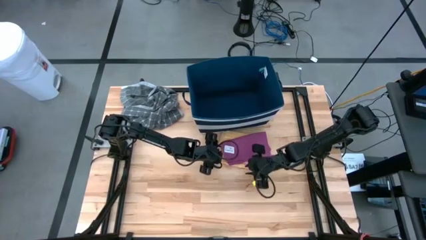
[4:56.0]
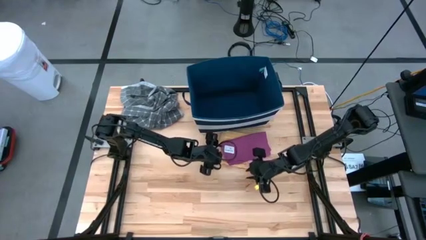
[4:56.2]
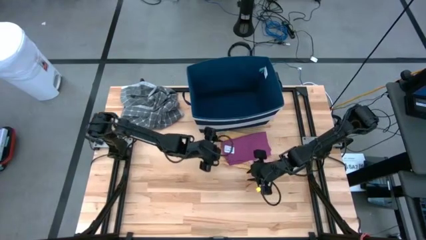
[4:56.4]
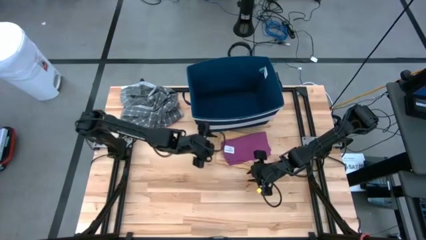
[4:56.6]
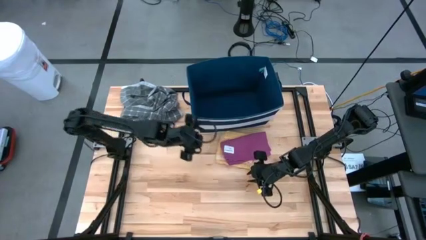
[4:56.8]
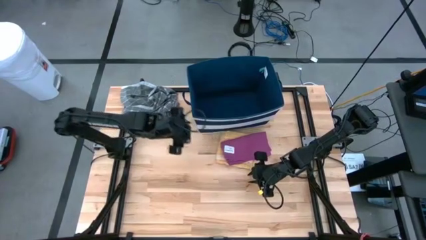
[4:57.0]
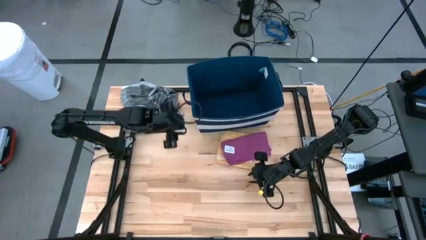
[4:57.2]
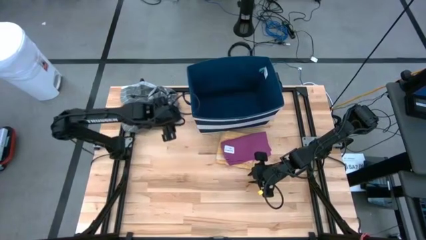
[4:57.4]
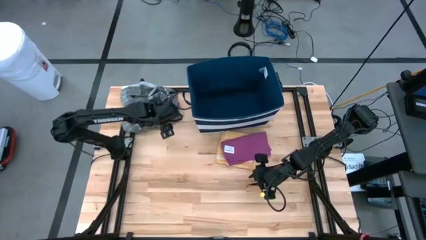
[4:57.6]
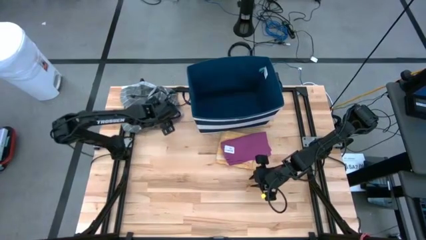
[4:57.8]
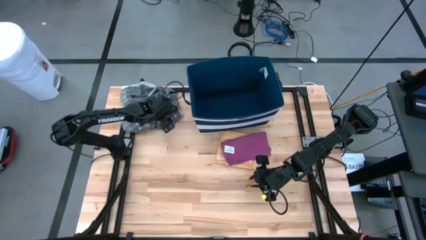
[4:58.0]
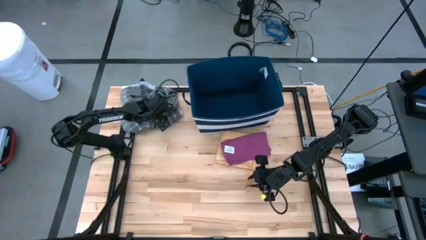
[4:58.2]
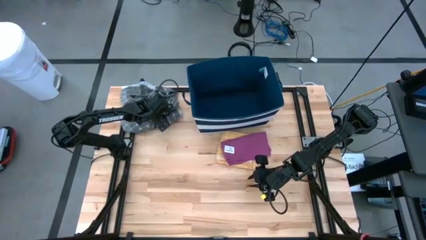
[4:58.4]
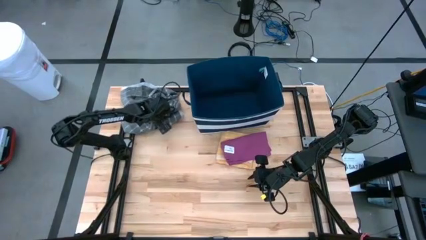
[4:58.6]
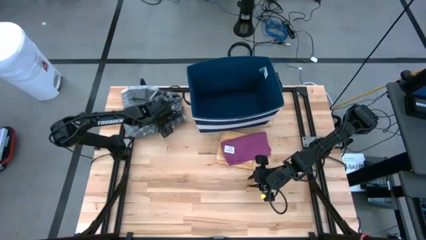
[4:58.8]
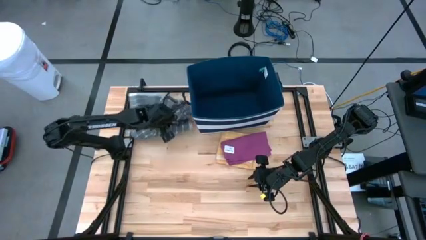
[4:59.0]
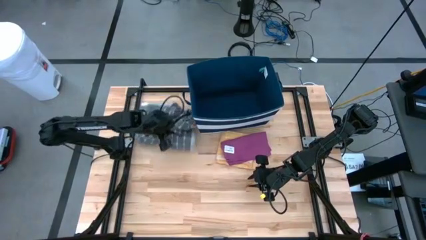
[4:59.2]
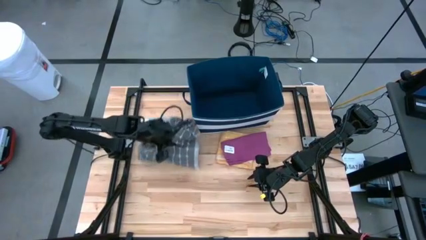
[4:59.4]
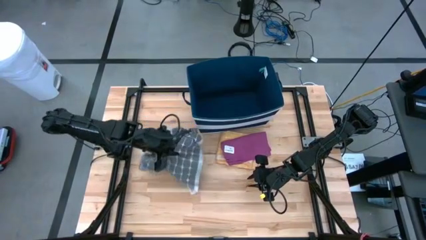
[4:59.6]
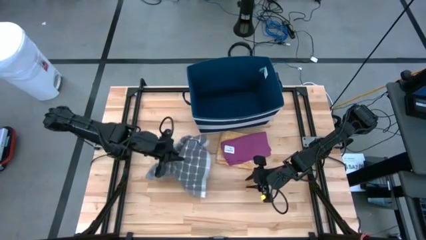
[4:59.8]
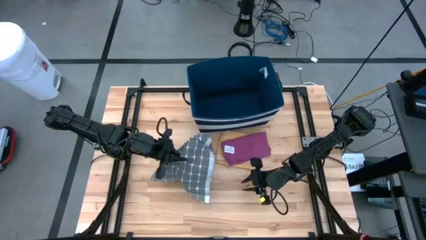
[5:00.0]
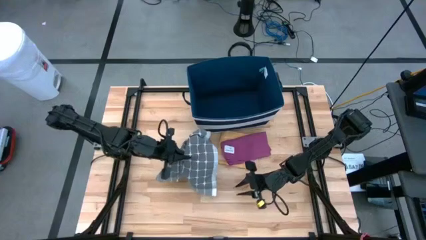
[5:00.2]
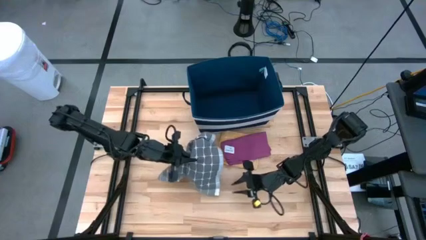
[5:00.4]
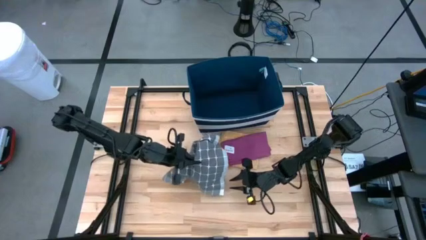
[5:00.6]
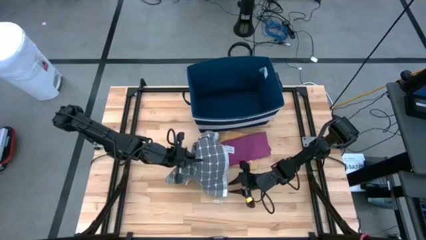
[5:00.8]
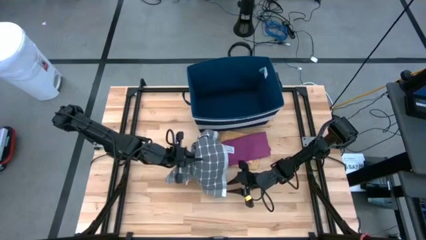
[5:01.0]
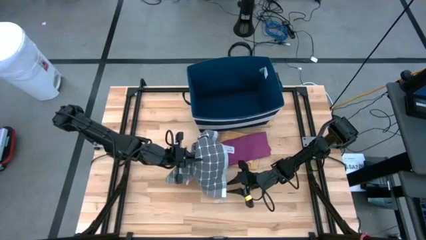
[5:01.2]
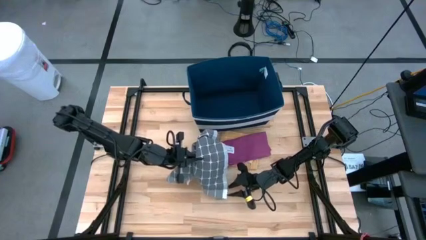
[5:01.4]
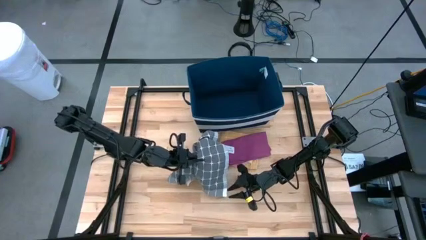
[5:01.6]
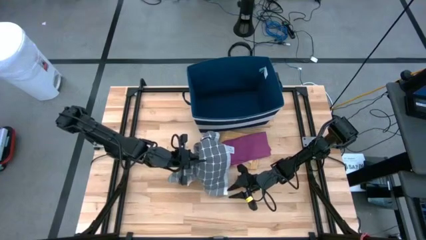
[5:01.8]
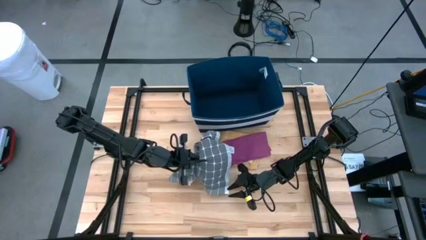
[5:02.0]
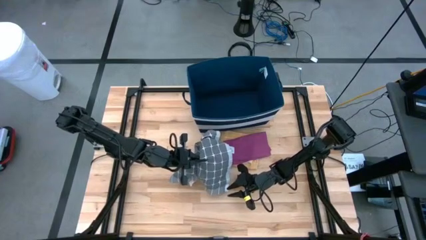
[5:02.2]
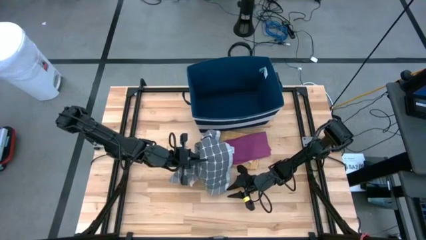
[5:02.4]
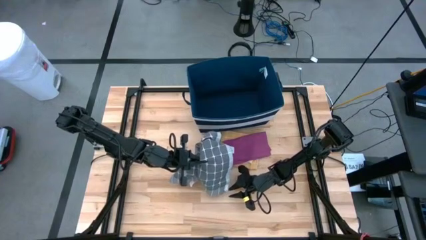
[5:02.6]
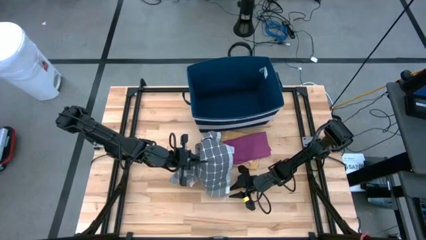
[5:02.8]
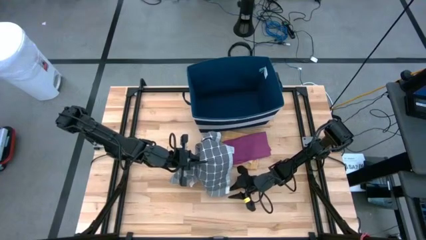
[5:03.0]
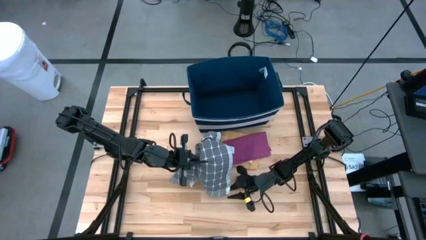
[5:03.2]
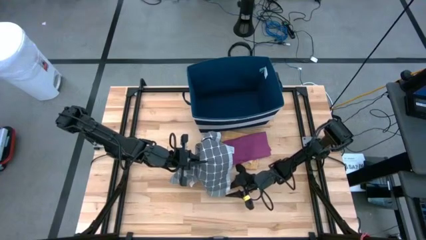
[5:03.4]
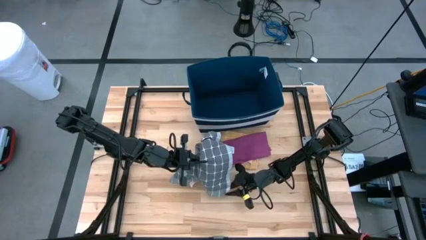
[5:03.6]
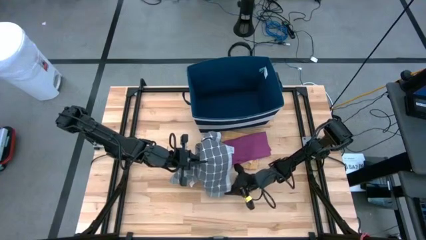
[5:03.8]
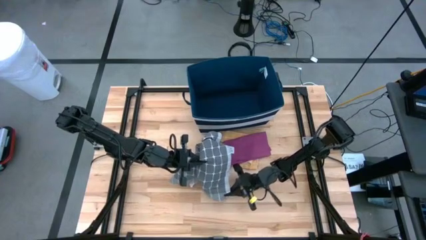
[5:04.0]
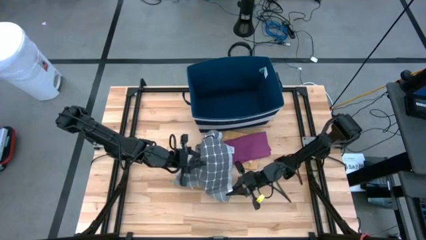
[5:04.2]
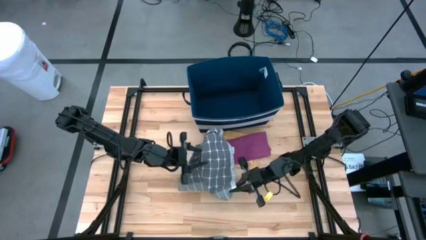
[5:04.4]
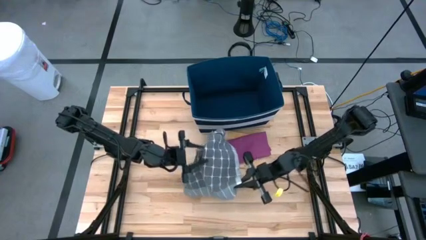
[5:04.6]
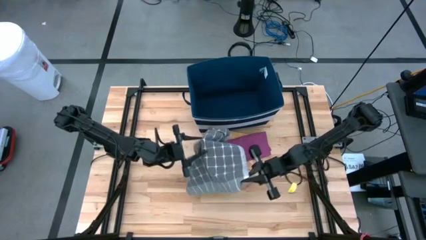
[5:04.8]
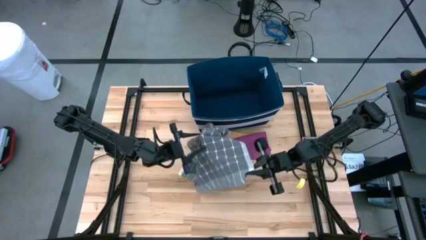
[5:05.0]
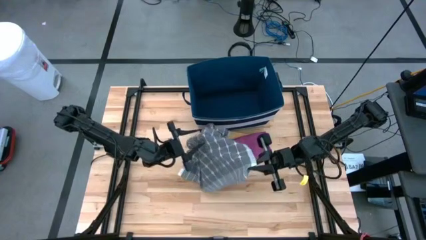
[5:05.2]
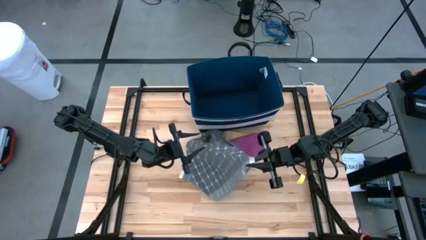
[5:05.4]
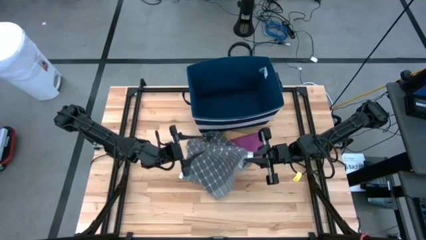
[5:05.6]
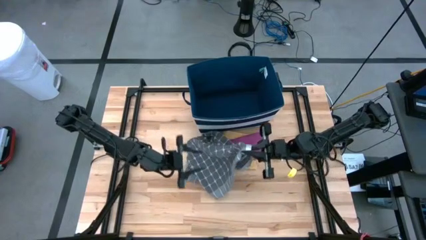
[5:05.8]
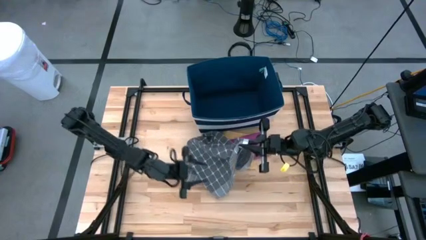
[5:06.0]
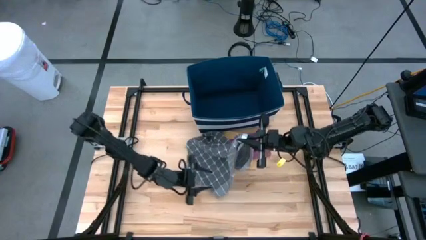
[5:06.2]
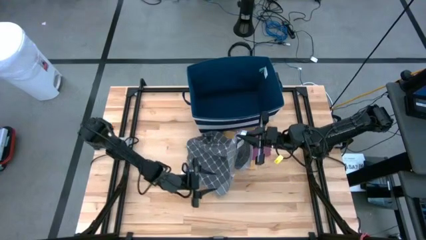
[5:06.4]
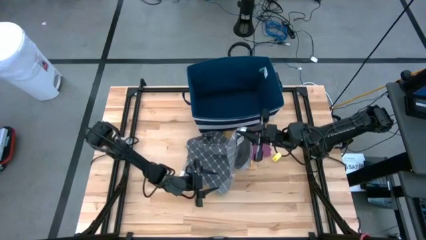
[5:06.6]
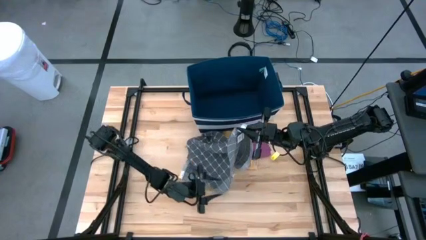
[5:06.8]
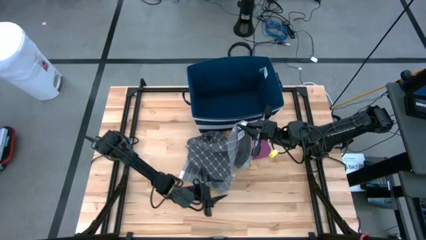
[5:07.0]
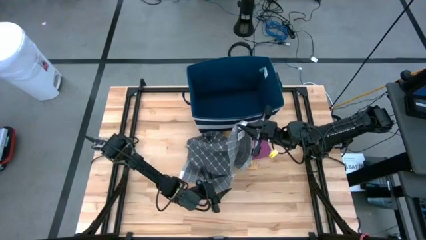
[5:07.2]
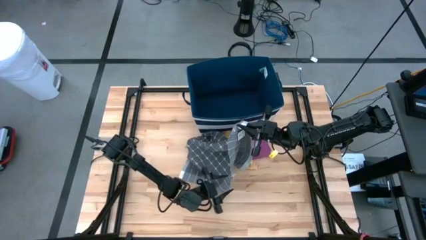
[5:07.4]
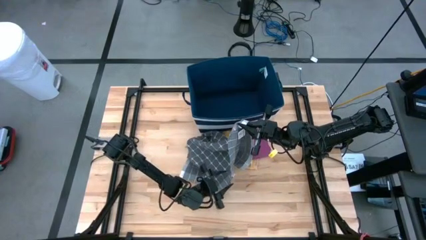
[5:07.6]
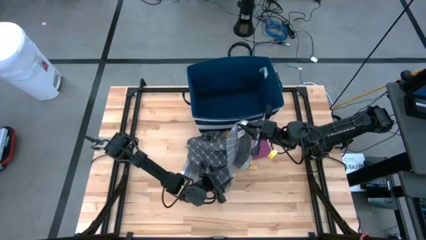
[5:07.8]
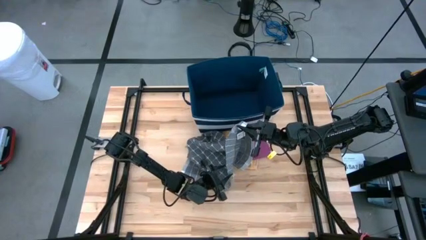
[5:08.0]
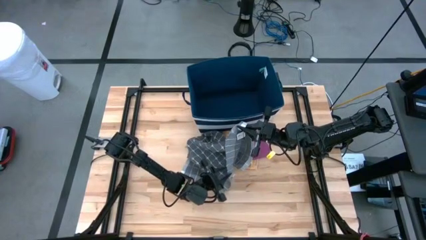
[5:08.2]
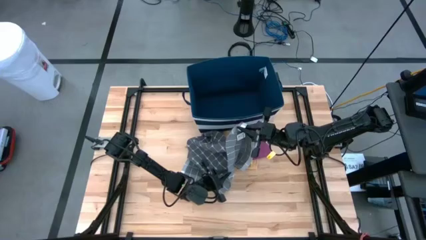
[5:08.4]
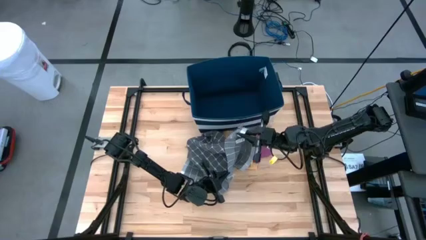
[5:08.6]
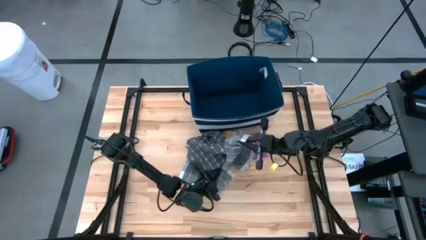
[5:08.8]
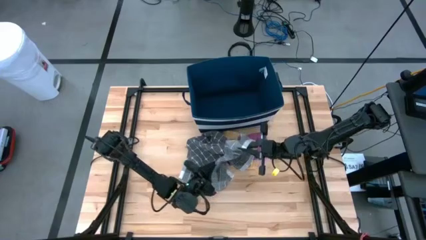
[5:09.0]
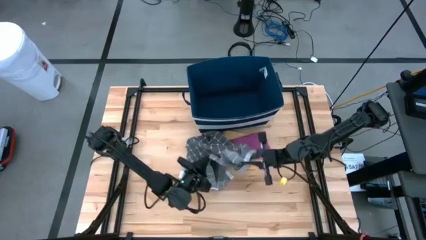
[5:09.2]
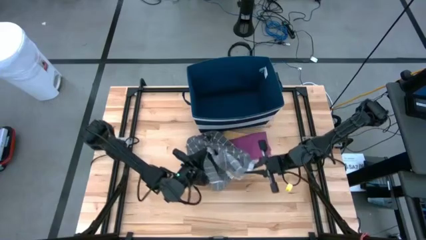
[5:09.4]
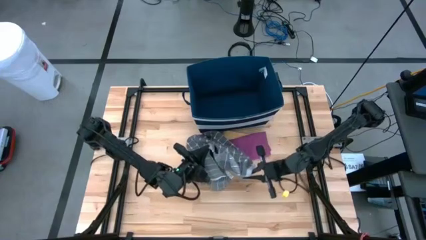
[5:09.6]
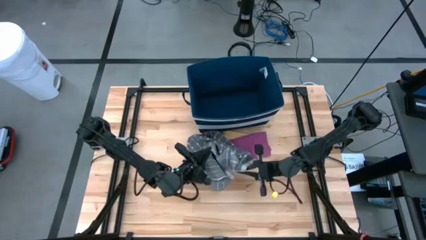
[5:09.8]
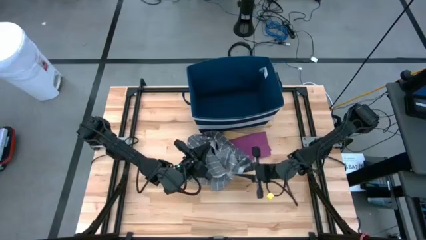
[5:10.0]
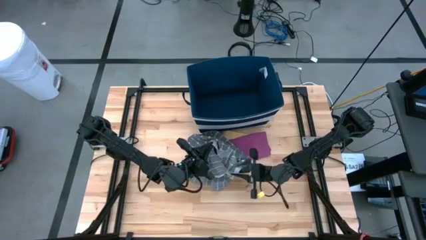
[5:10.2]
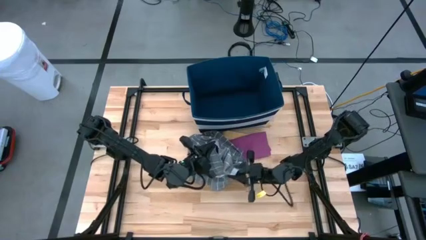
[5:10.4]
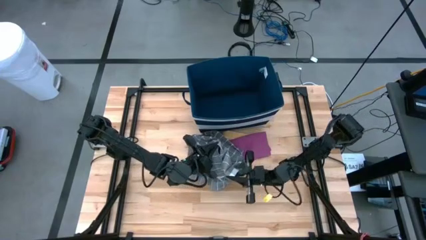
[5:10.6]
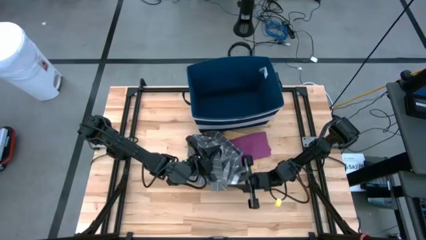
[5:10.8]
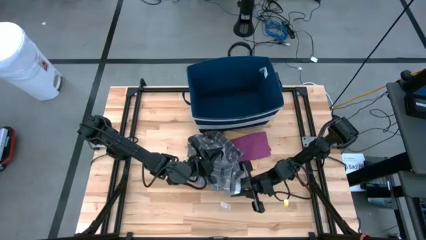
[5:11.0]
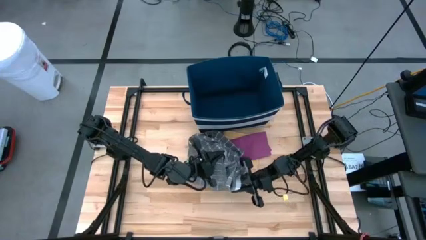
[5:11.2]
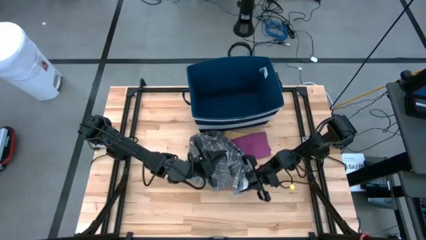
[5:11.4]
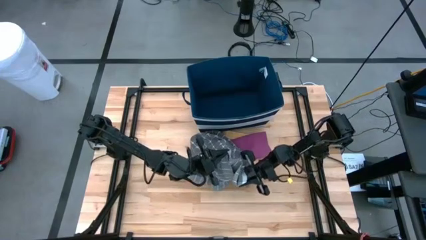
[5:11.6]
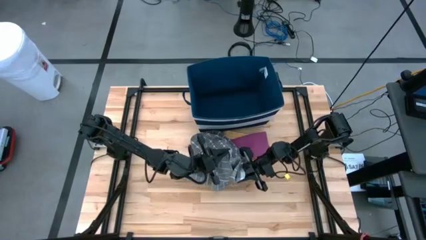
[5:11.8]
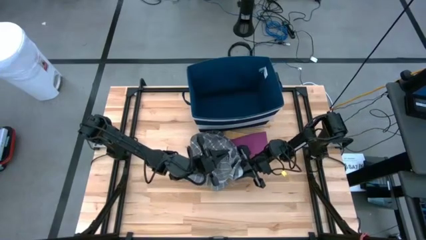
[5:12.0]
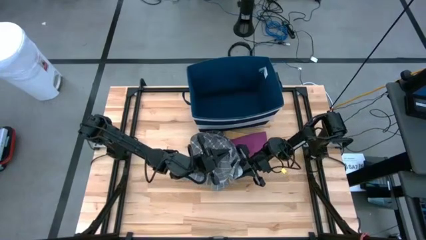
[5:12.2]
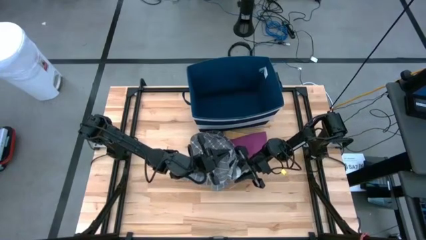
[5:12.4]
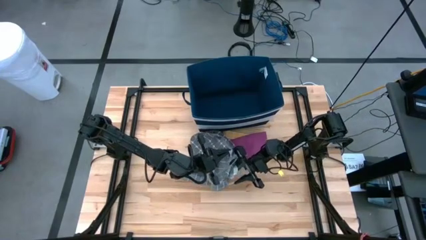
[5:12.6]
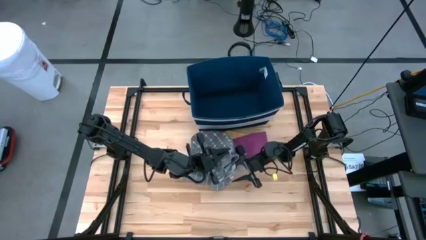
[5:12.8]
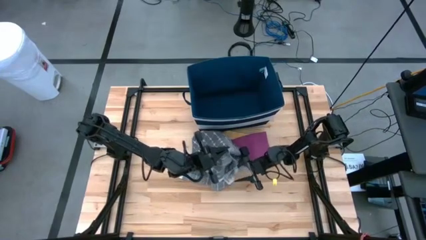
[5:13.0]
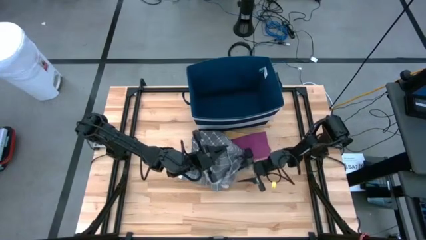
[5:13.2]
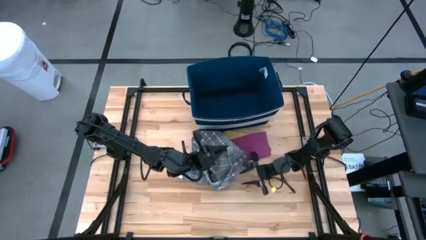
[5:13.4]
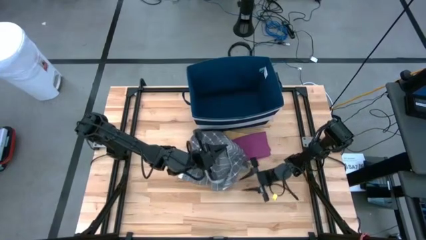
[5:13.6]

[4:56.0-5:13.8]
Task: Fold towel
Fold the gray towel
